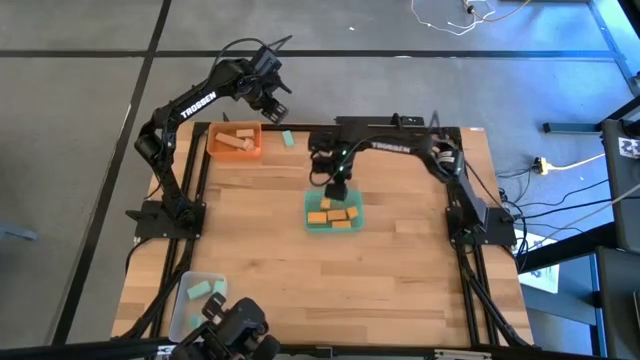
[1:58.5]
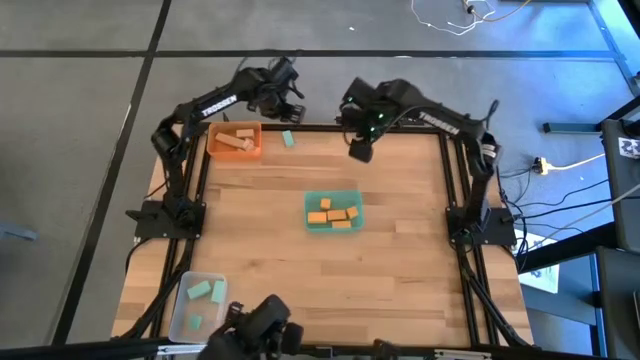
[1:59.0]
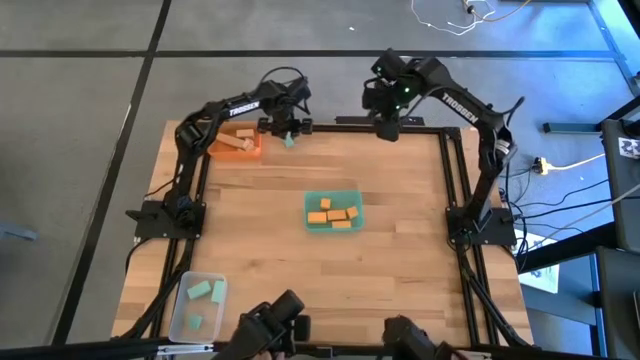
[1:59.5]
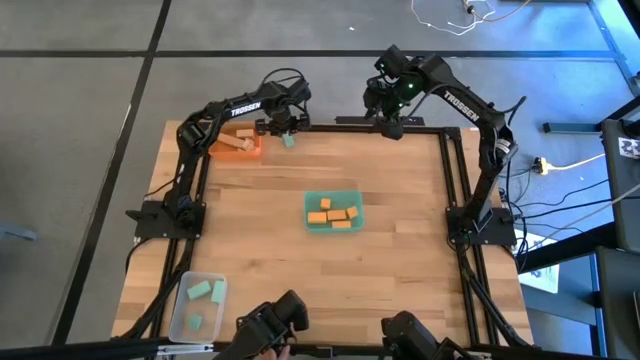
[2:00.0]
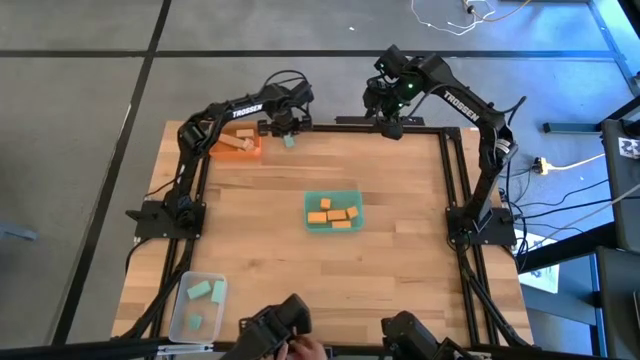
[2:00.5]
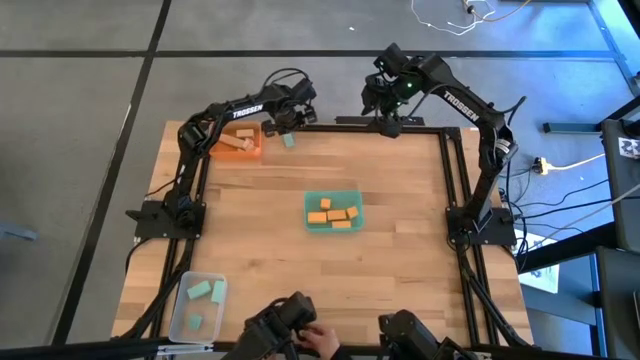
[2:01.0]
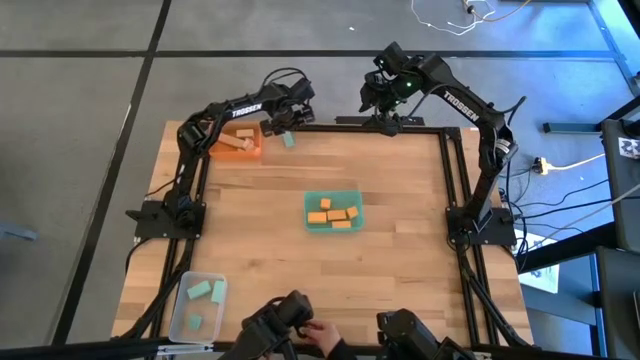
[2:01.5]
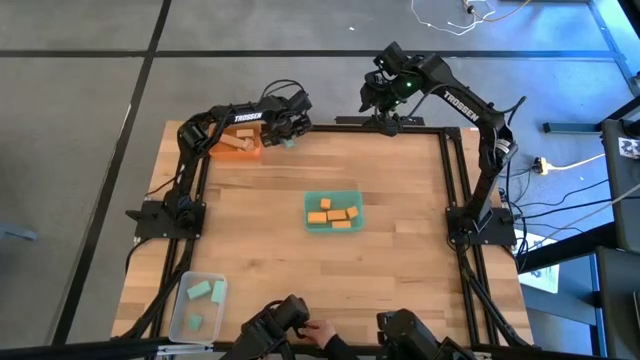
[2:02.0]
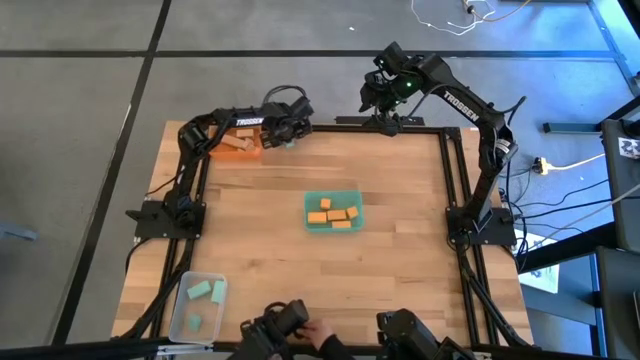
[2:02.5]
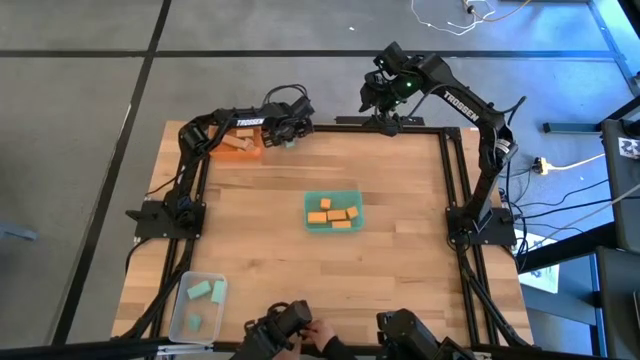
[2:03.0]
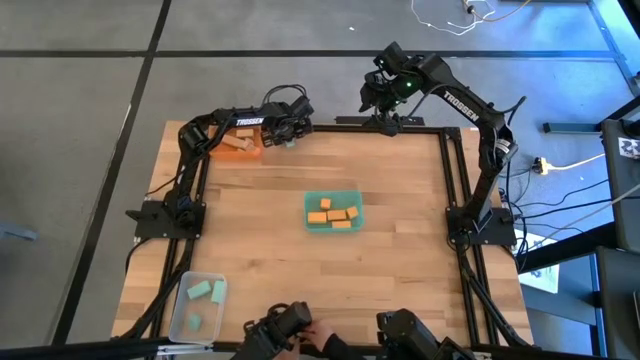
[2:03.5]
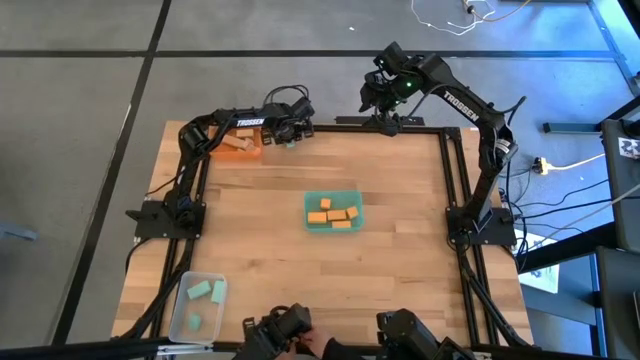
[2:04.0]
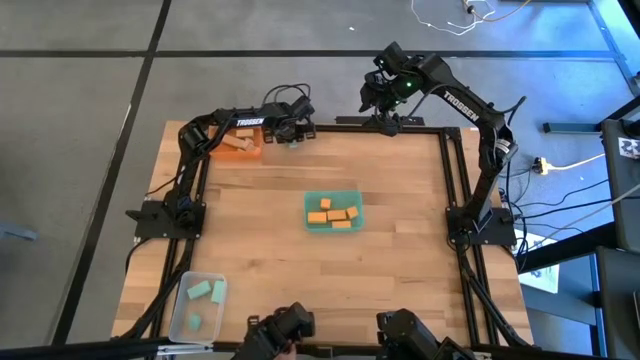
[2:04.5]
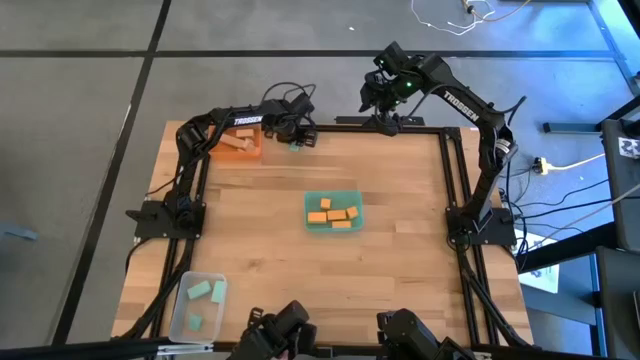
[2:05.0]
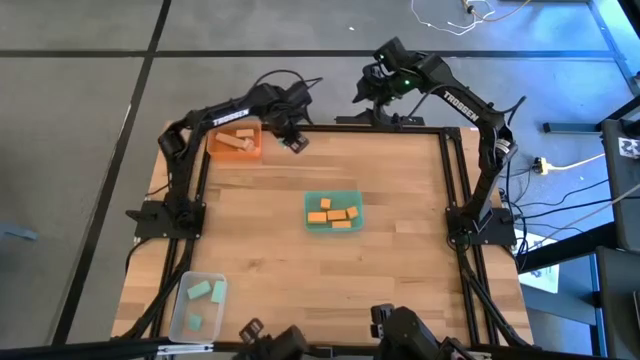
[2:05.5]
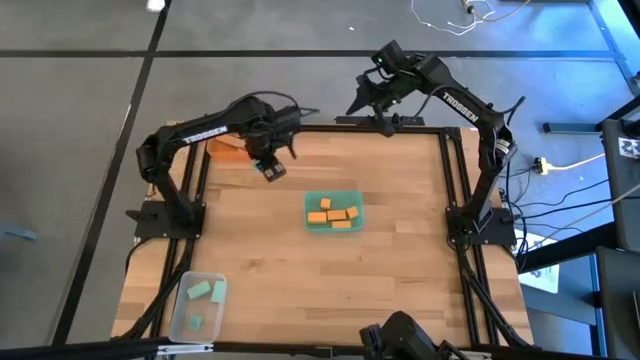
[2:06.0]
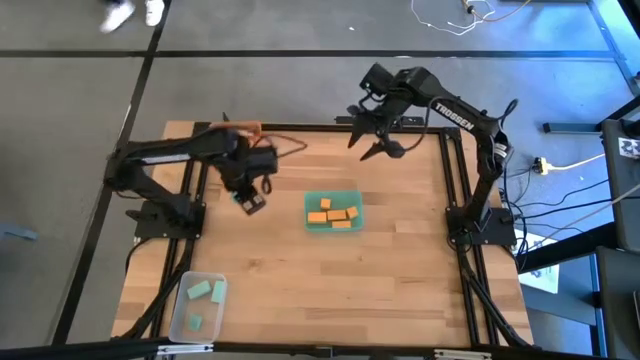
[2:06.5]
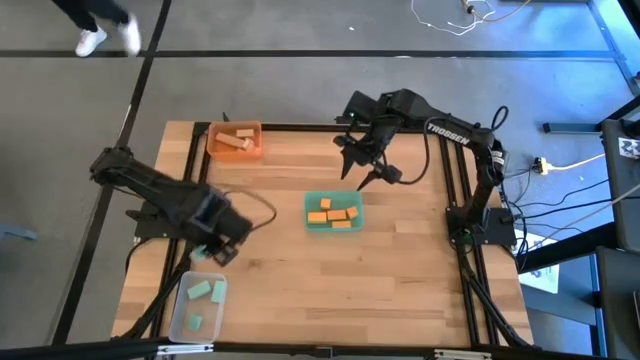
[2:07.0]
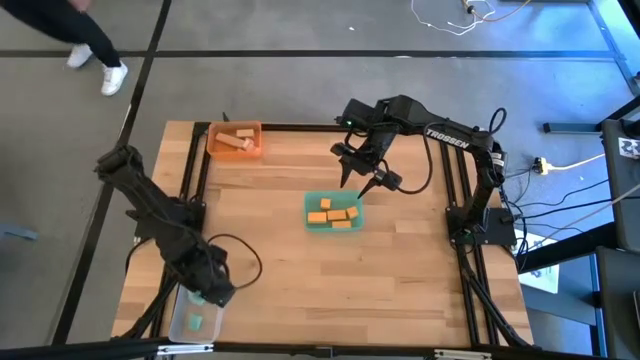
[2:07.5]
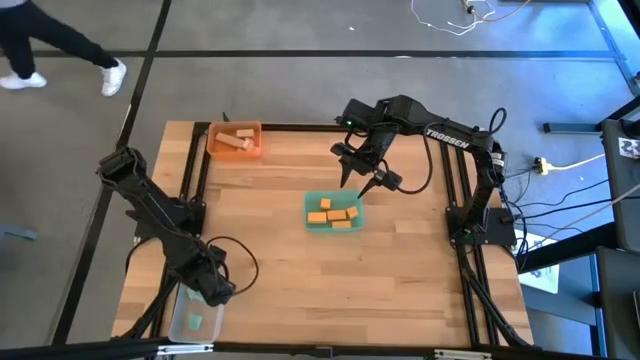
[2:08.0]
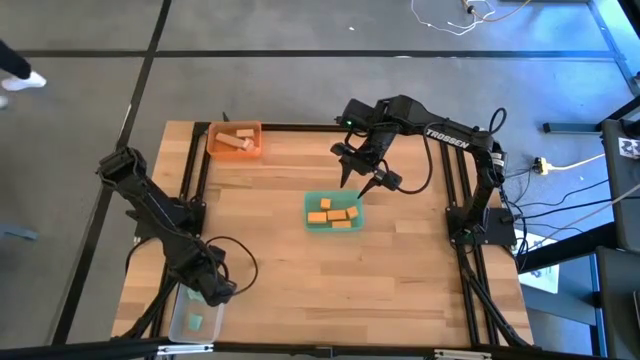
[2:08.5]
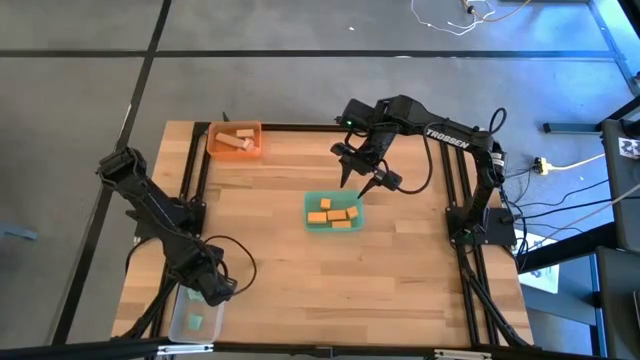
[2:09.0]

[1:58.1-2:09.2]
Task: Sort & place blocks by color
Put the light blue block into the transparent bin

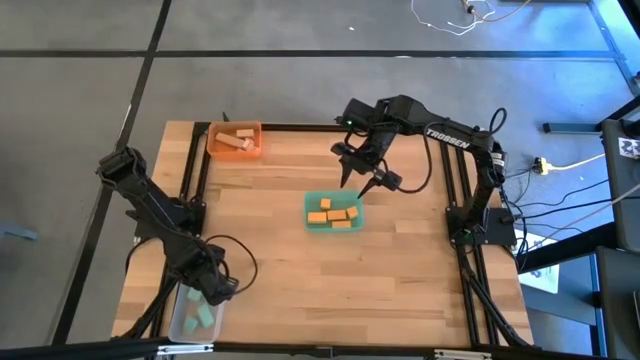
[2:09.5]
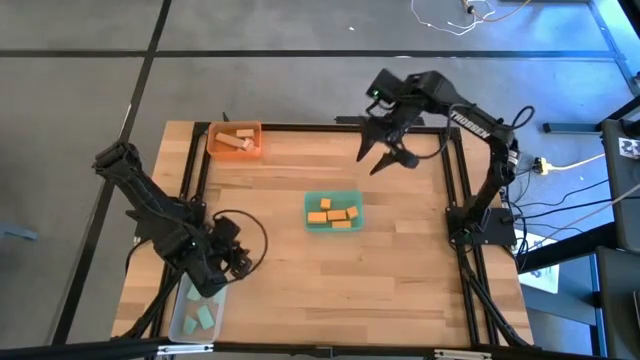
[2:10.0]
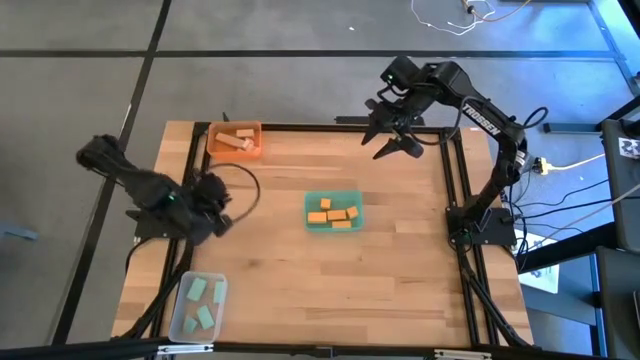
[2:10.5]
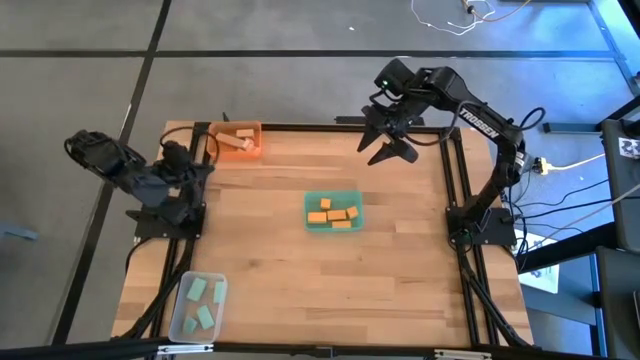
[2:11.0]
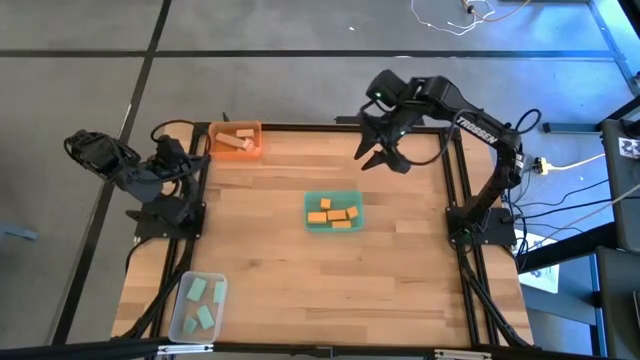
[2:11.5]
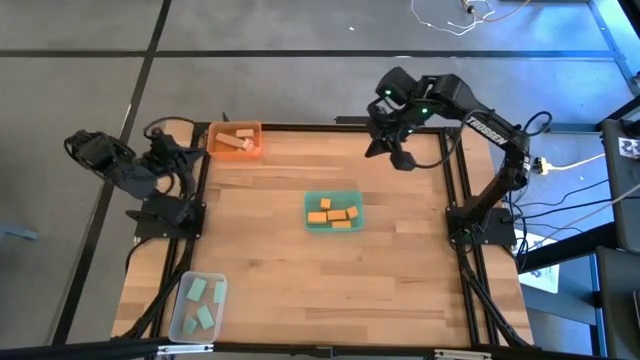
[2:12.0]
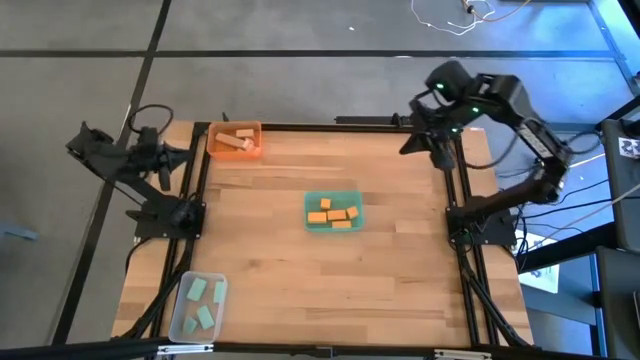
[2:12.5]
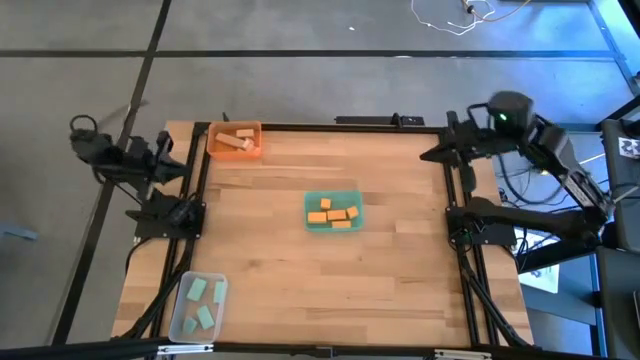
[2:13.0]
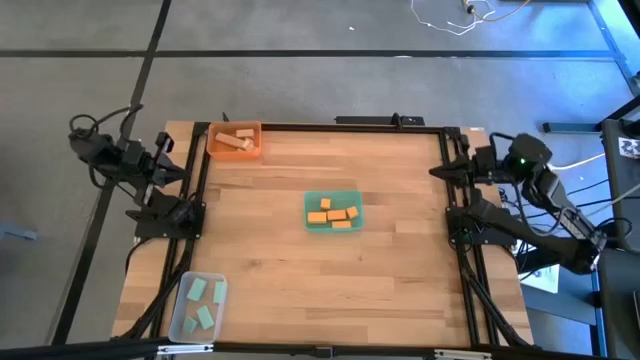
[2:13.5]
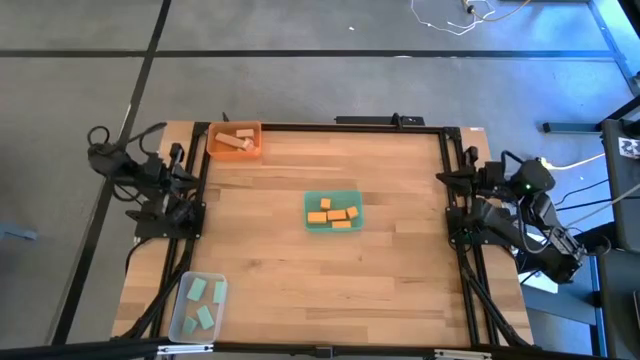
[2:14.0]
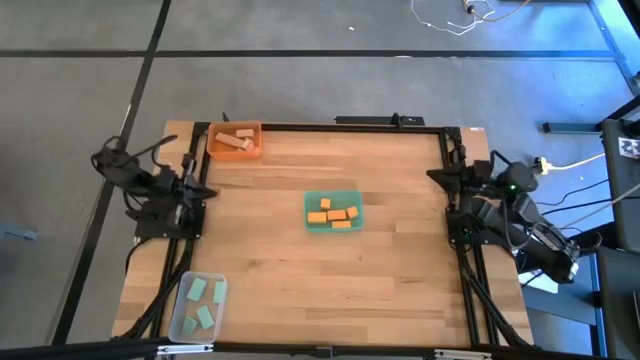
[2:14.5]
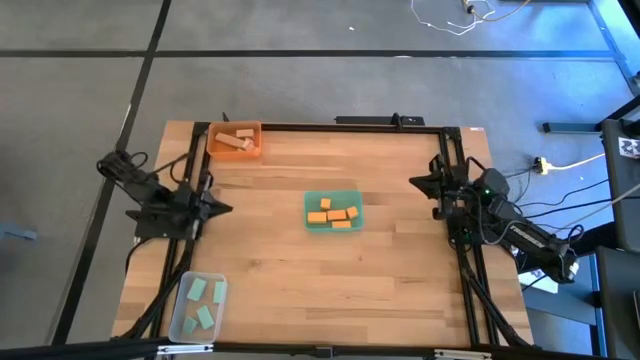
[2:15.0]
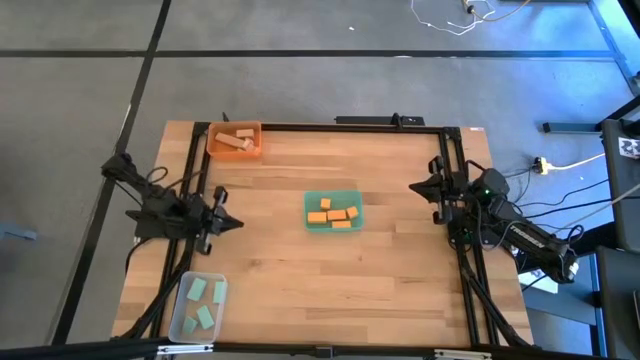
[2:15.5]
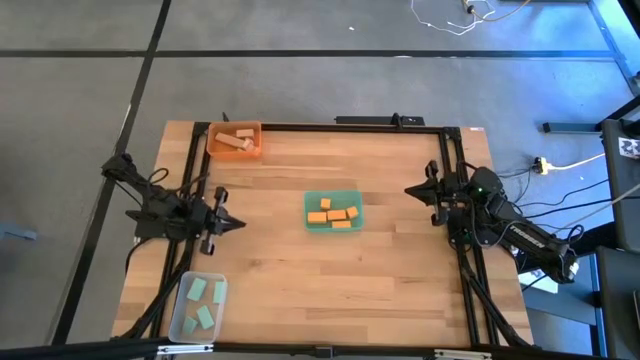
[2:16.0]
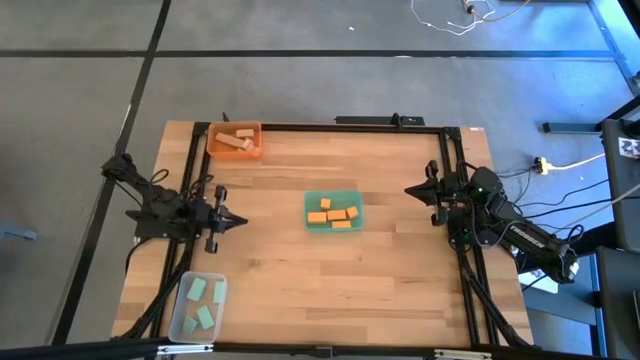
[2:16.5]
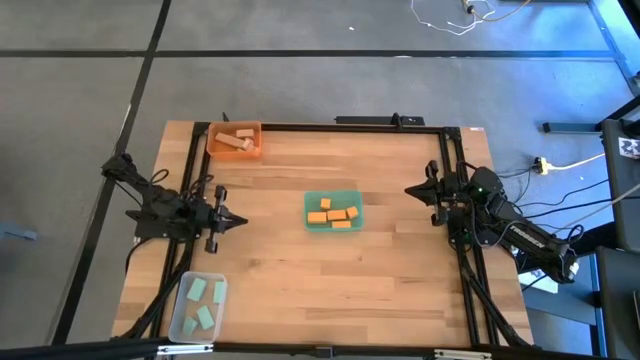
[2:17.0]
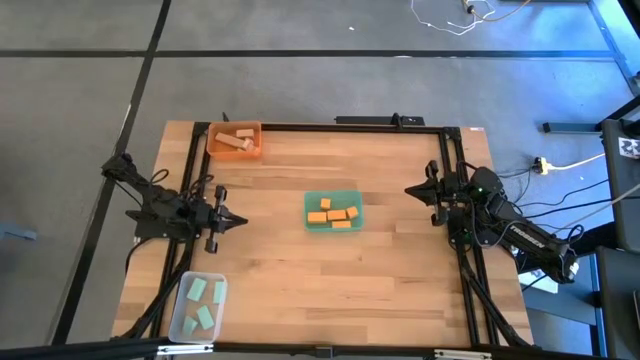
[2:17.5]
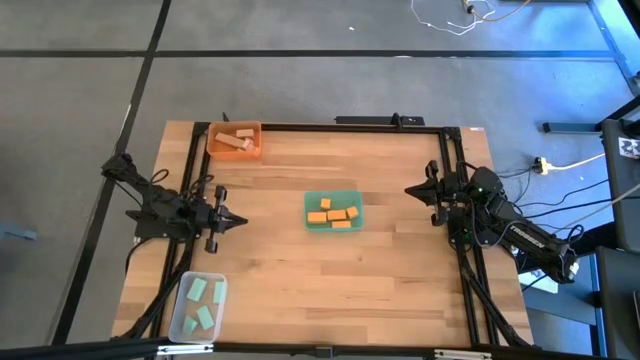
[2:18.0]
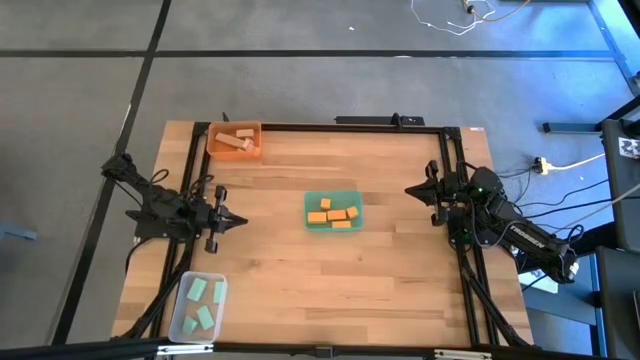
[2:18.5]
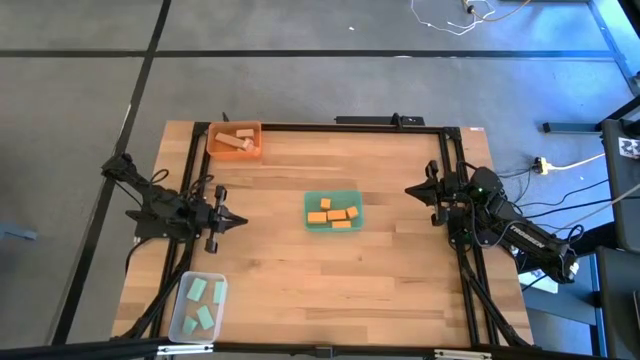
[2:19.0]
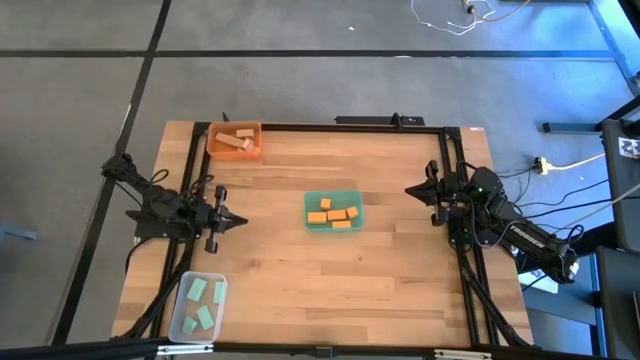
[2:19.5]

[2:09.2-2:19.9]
Return to Home Position
